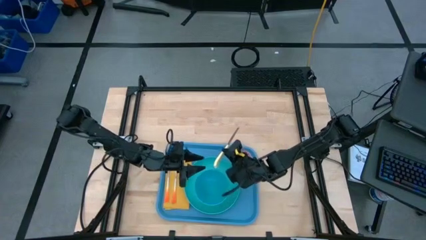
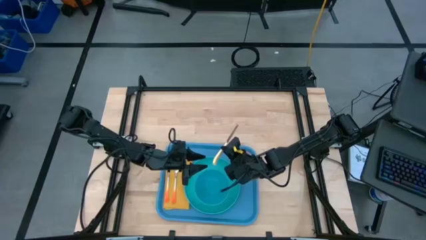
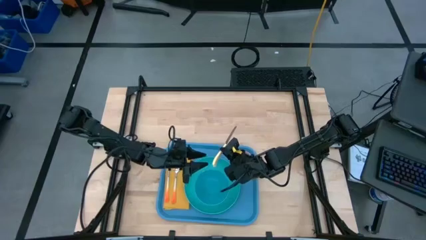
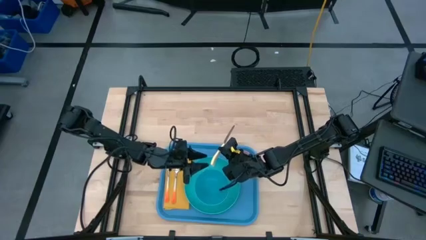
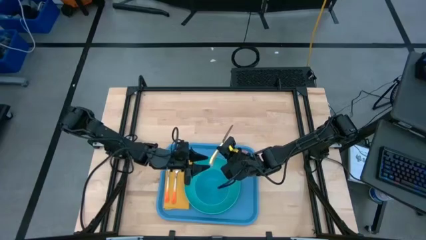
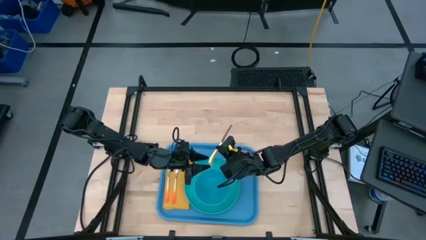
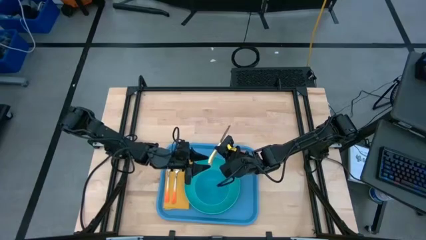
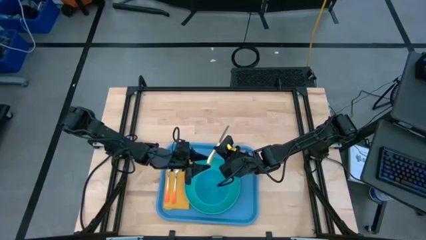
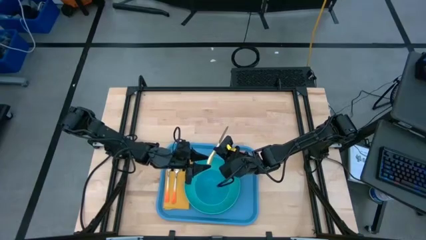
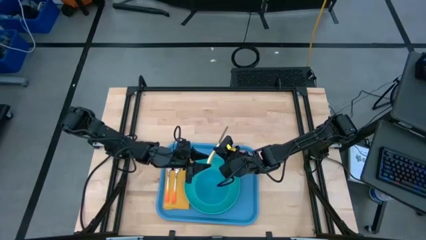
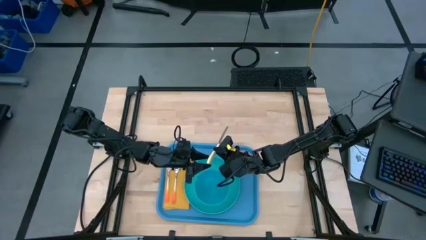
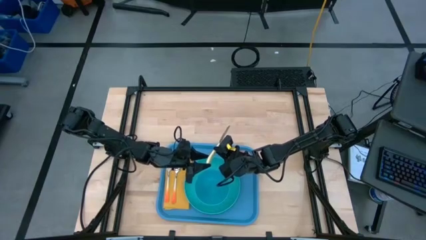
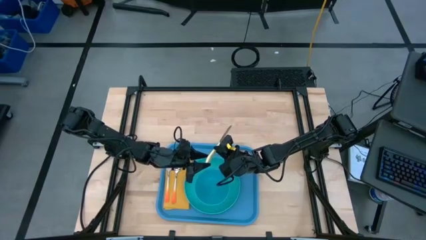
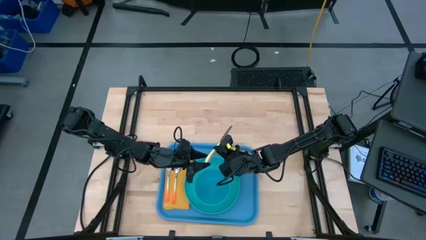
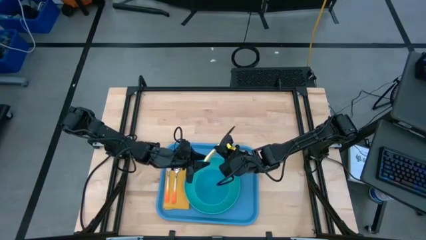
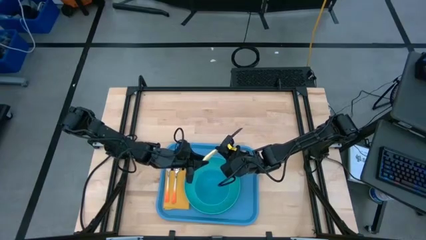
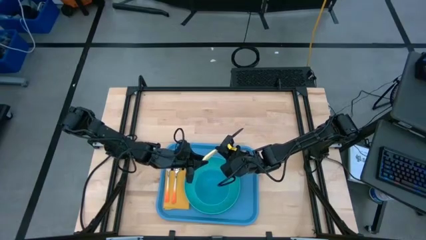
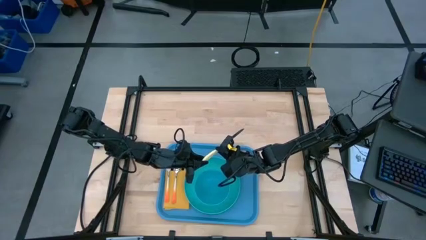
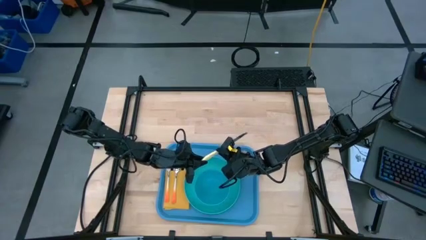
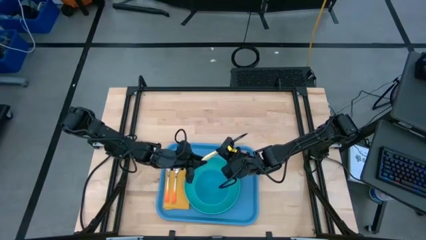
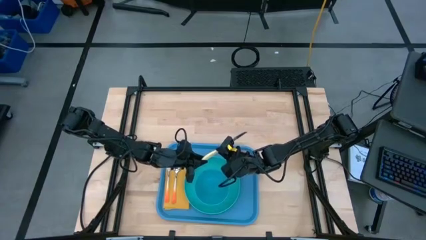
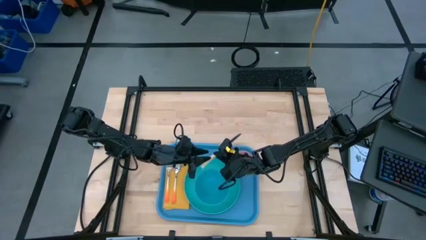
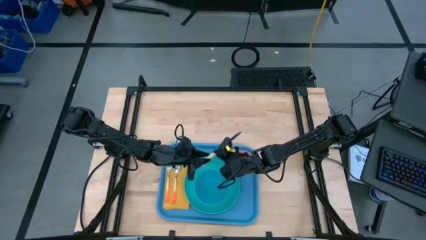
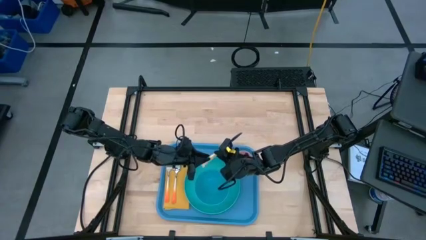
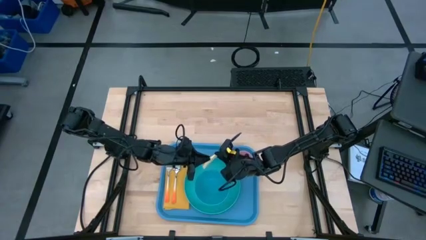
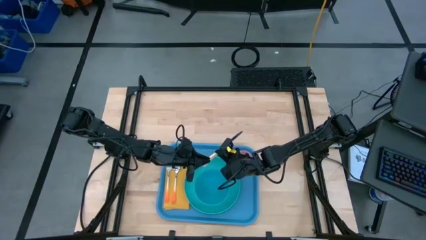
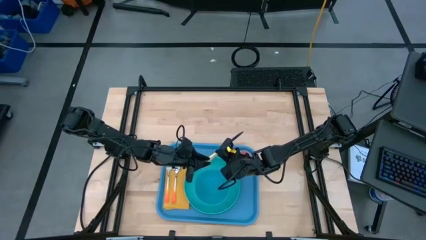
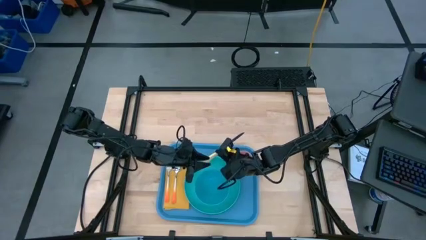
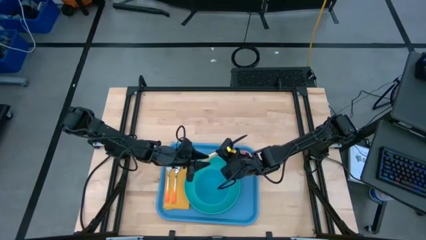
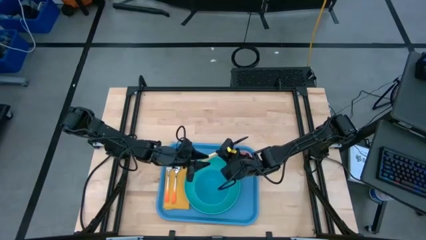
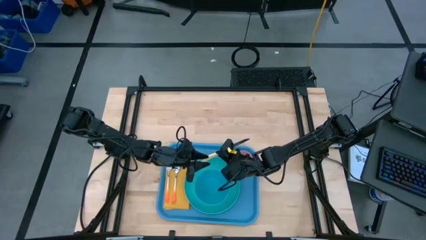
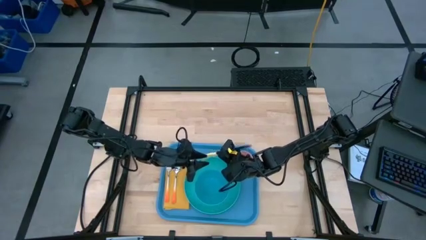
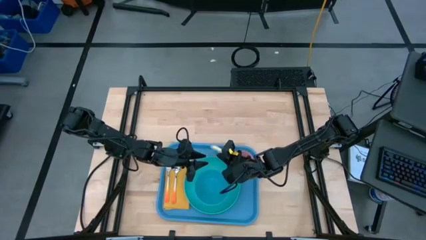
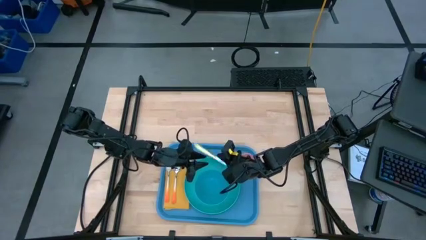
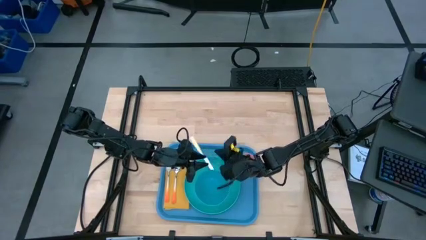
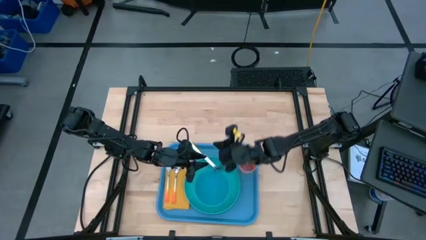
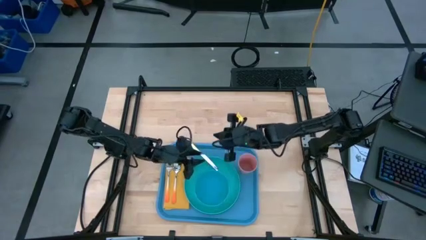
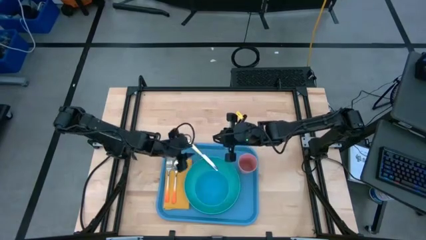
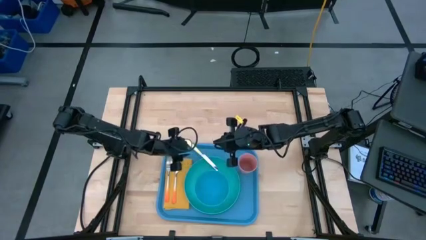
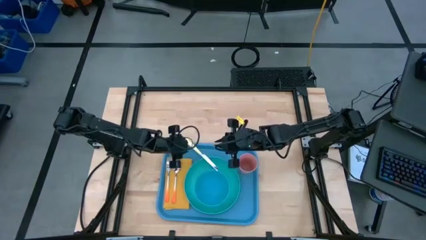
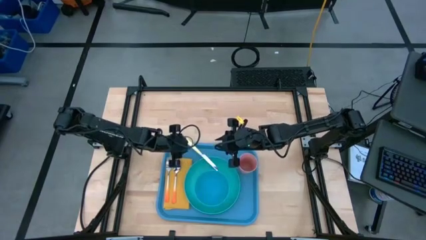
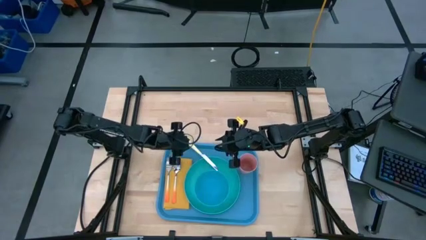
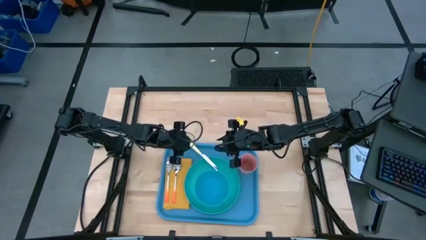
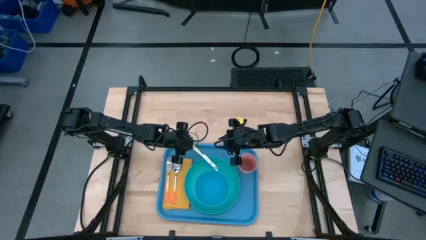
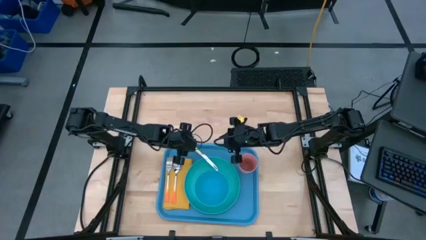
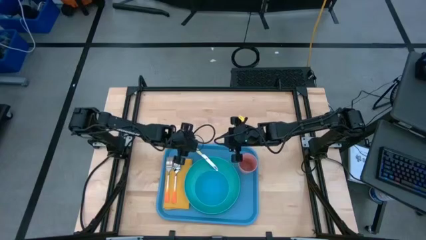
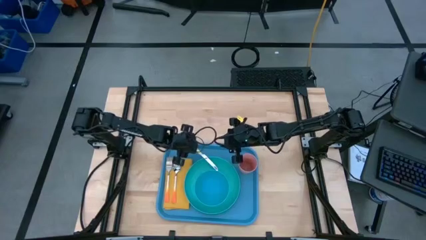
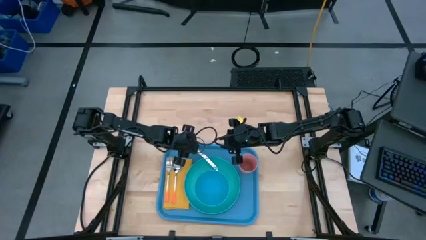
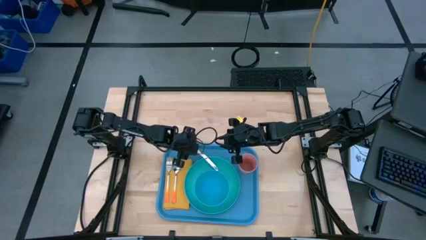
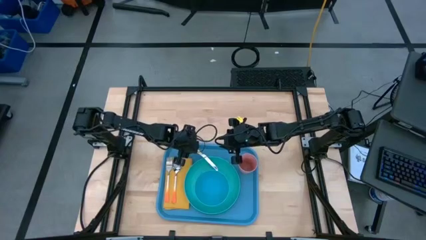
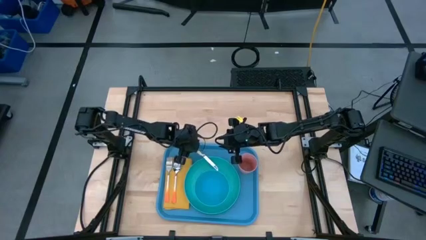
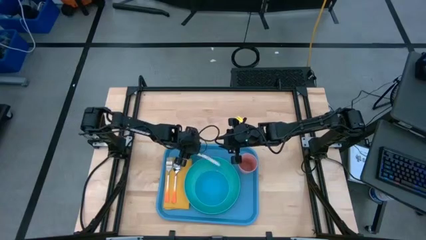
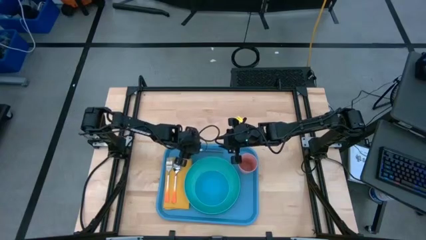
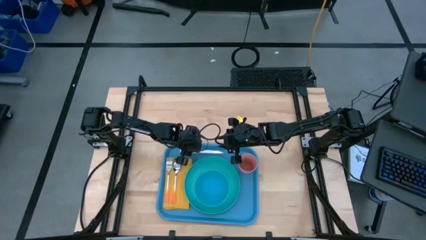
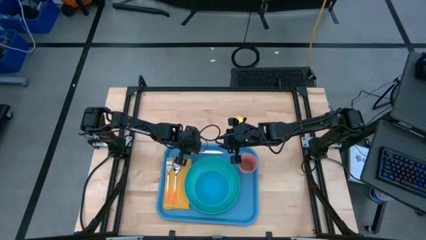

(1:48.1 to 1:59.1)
Task: Set up tray
Put the yellow knife on the yellow napkin to the right of the orange spoon
